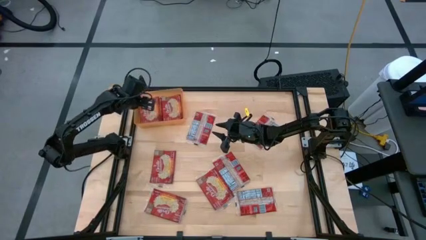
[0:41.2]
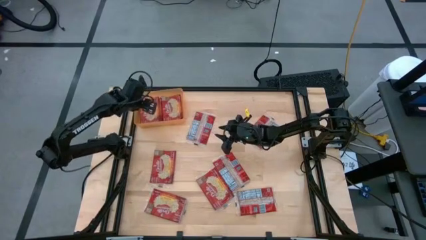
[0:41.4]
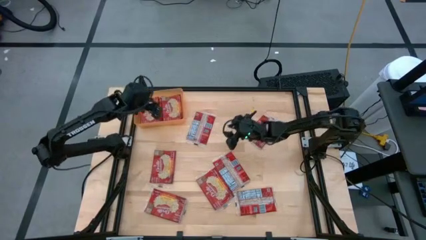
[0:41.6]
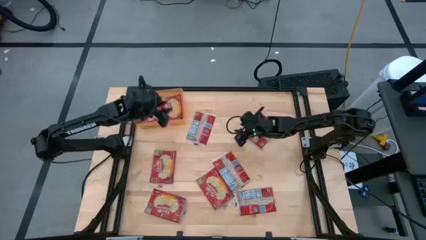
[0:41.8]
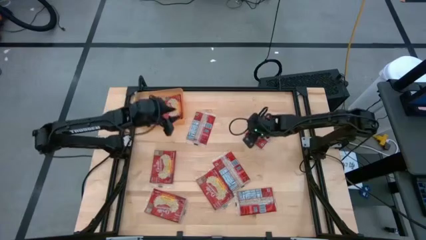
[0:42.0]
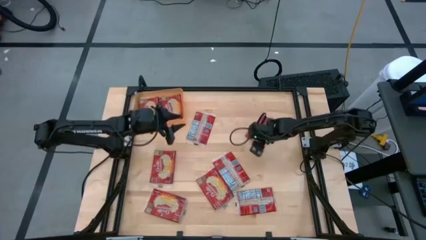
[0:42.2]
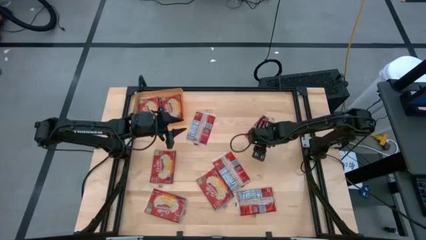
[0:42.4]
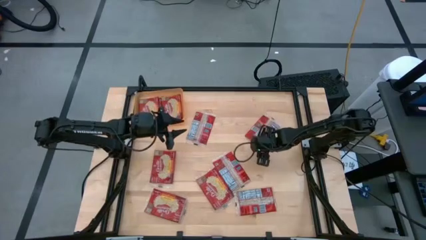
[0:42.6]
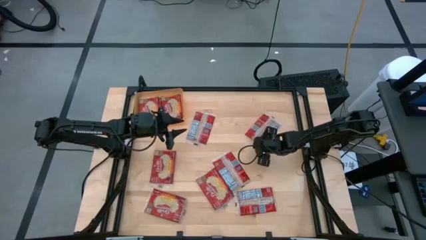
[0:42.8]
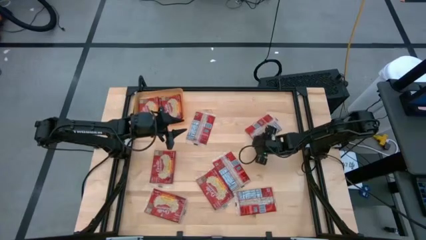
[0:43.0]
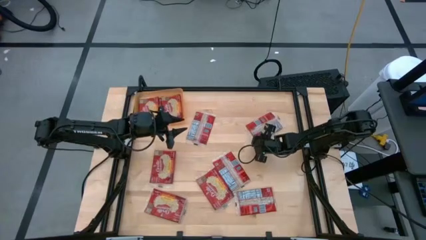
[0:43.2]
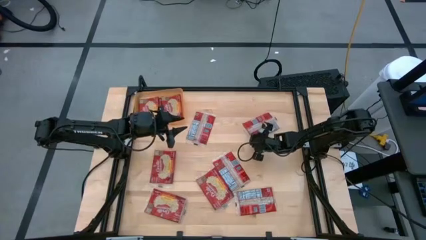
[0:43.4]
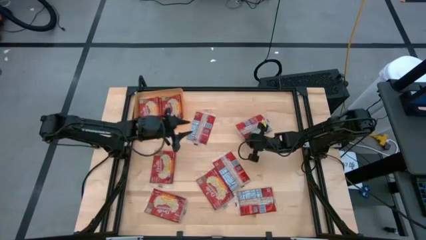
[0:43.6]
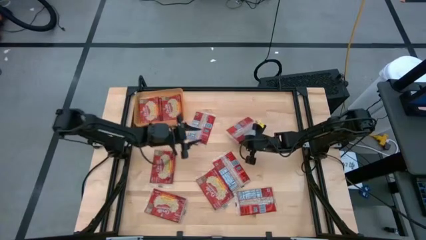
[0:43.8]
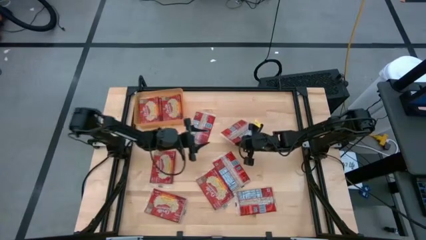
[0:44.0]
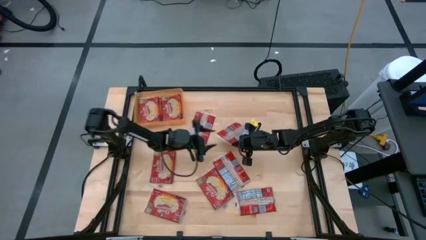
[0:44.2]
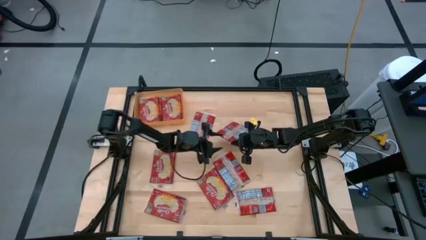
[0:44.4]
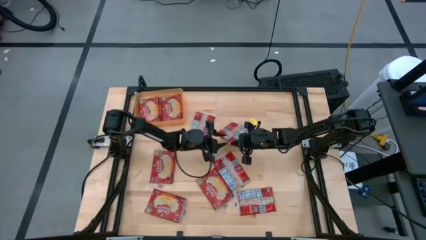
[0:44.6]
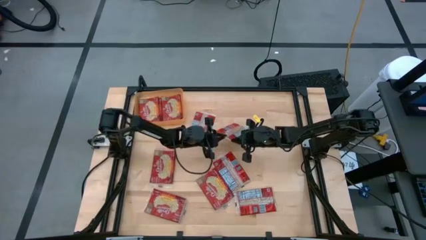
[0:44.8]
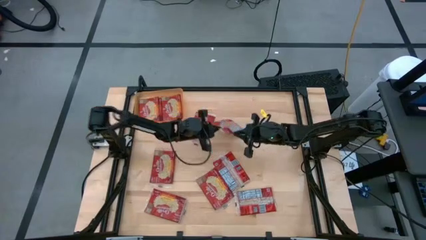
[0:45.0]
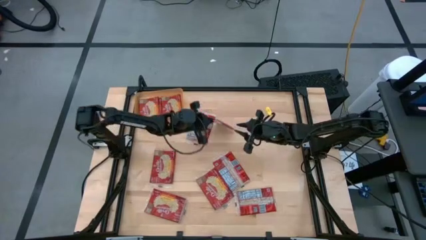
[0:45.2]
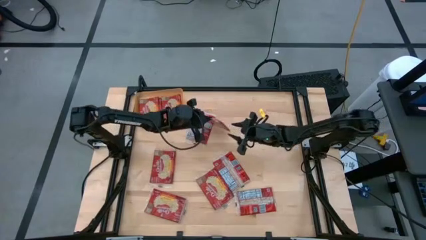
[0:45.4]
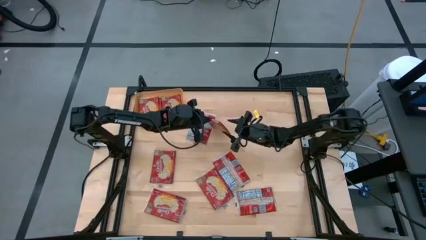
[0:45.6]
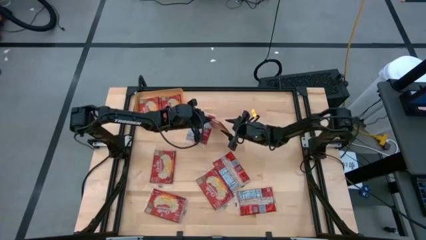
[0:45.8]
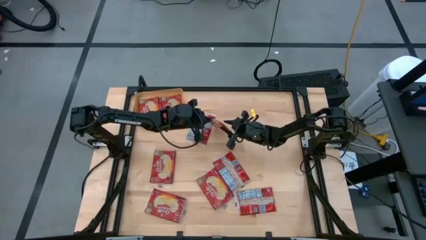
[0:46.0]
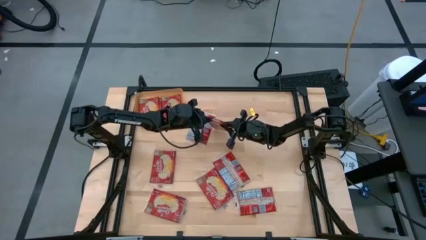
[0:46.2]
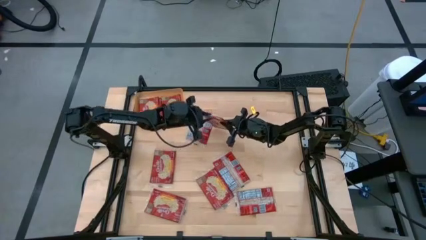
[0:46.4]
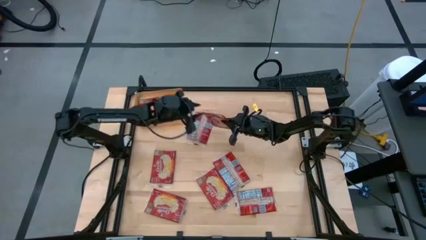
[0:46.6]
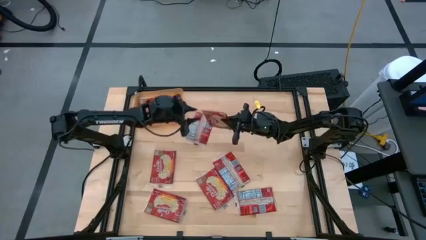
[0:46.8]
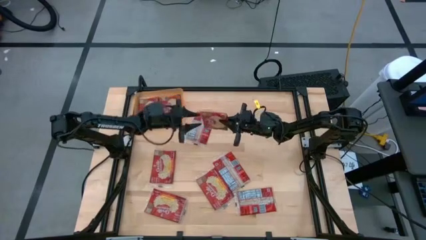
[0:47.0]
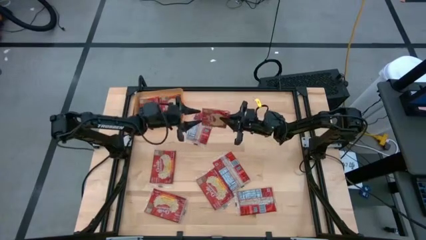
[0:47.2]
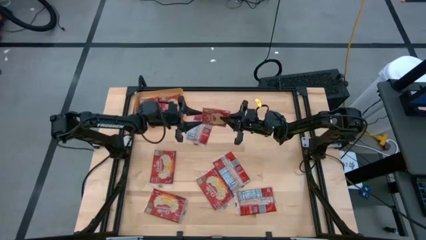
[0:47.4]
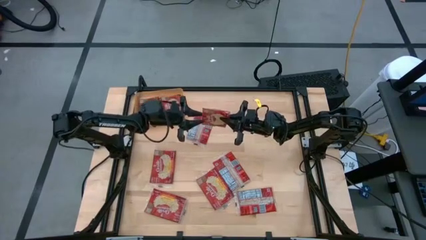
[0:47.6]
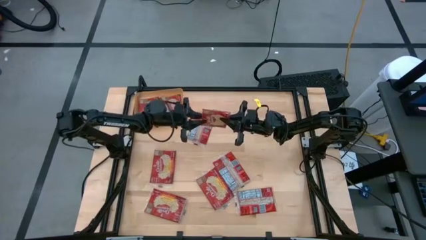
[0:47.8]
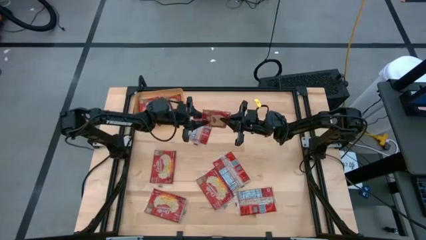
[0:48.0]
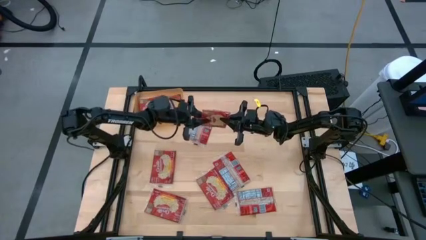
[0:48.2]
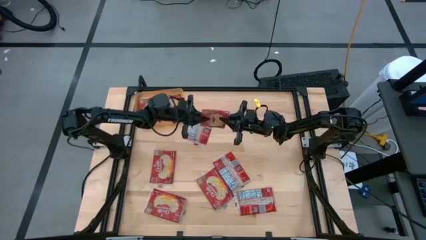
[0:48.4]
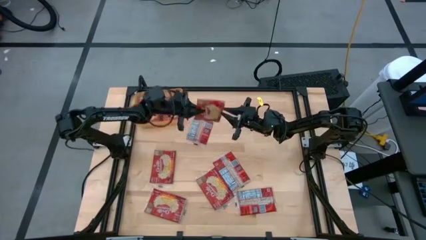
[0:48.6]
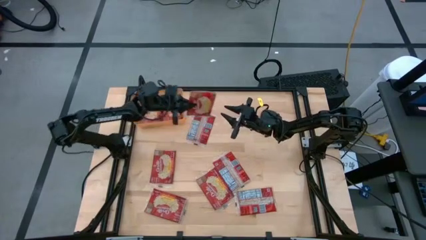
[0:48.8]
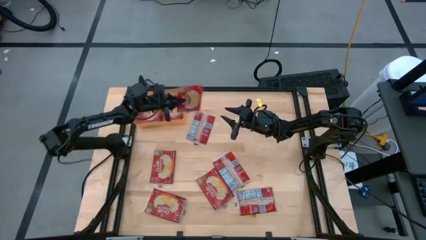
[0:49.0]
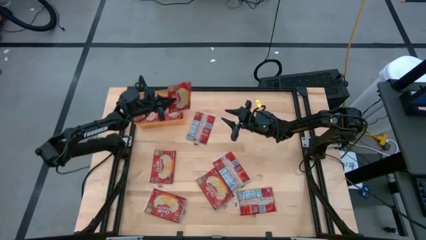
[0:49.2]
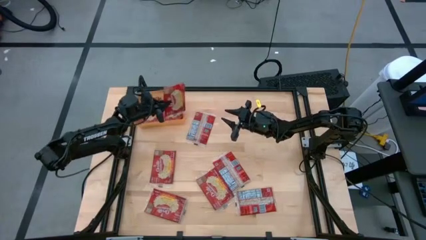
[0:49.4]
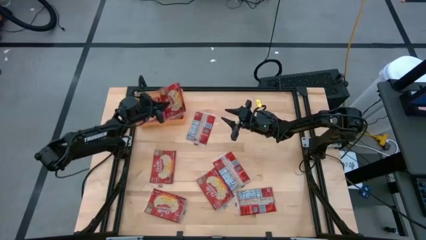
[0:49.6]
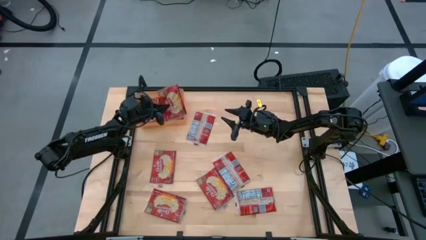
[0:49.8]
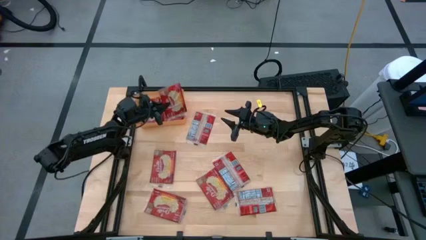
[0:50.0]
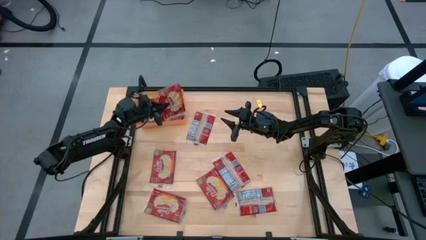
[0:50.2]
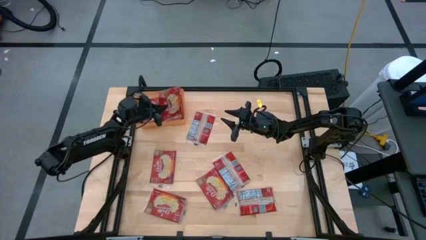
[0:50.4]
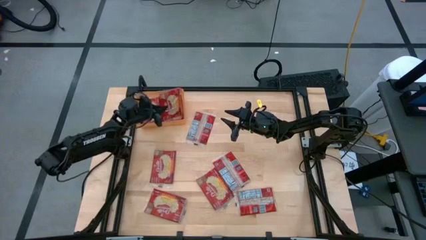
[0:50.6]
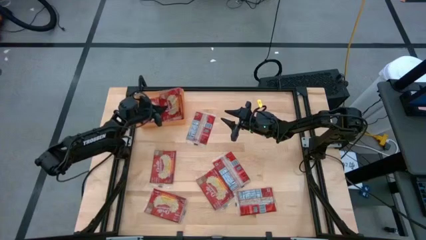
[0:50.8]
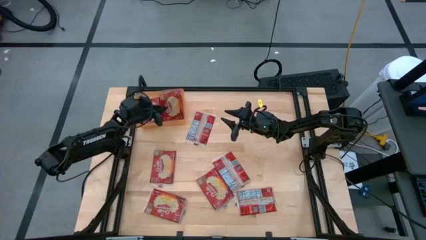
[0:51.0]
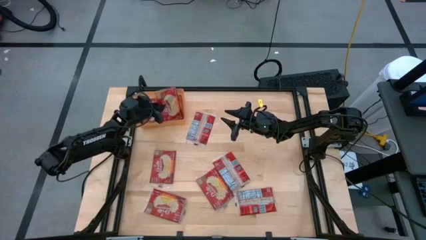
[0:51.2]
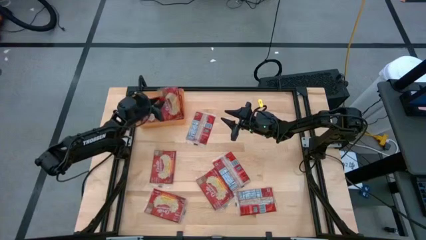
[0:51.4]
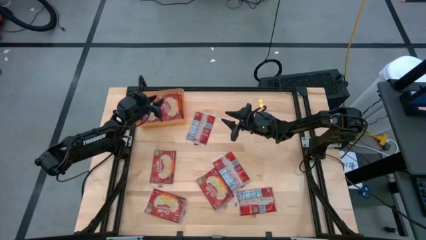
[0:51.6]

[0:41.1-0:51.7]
Task: Sort popcorn bags into baskets
Put the red popcorn bag into the orange bin
